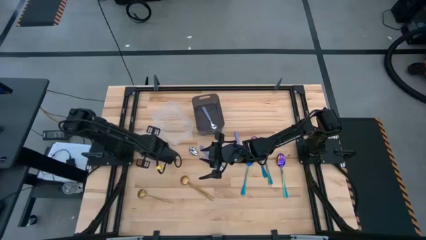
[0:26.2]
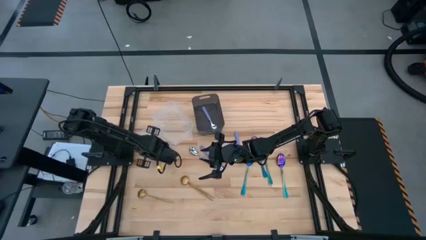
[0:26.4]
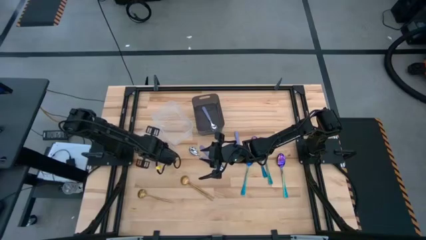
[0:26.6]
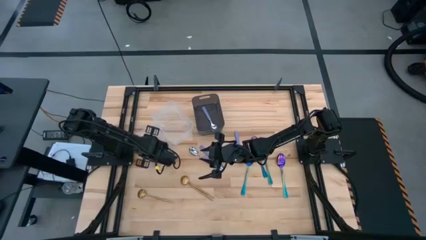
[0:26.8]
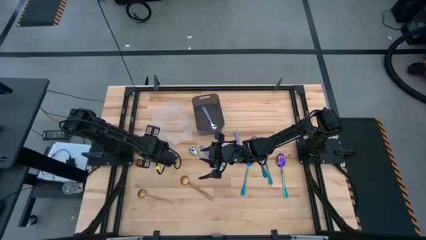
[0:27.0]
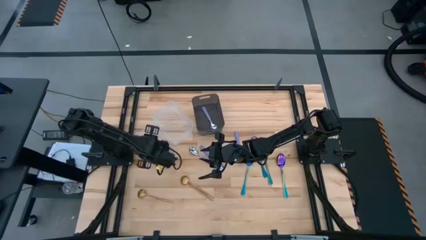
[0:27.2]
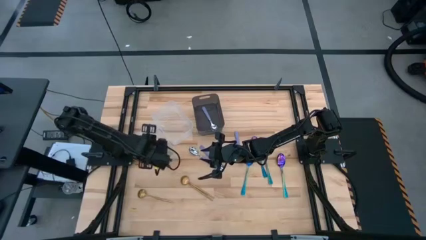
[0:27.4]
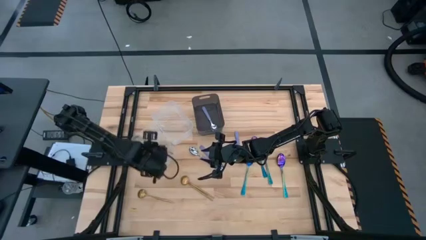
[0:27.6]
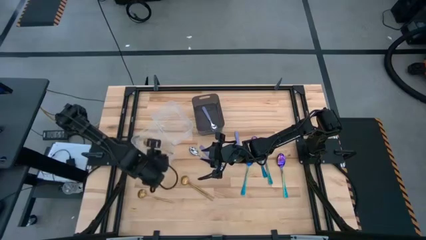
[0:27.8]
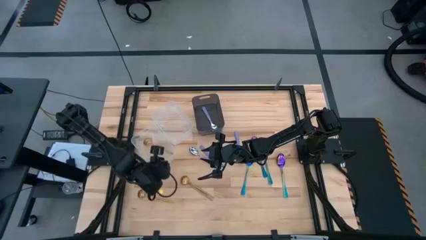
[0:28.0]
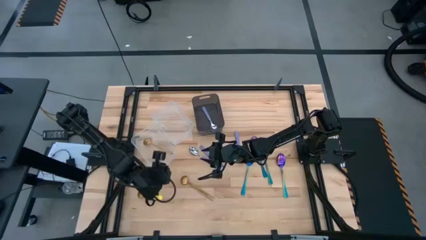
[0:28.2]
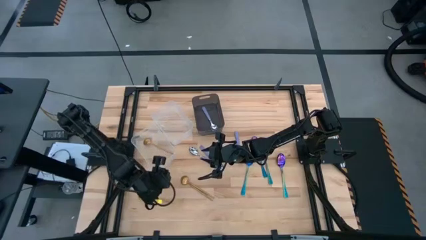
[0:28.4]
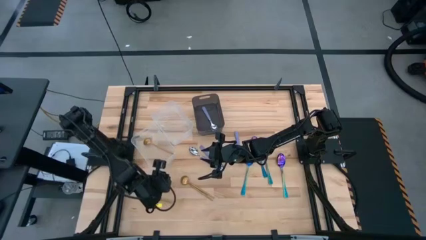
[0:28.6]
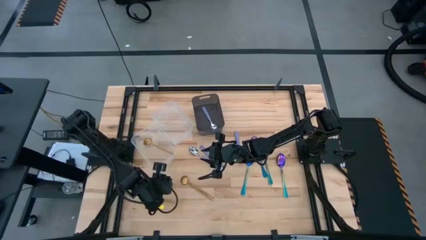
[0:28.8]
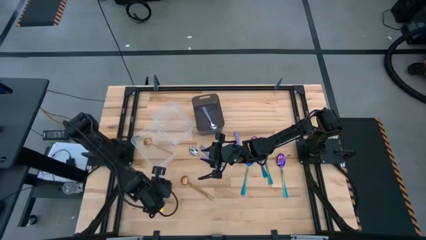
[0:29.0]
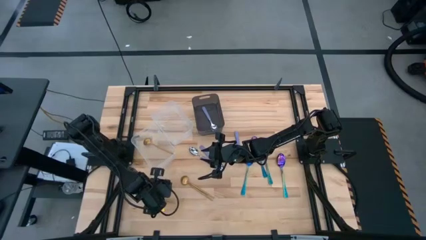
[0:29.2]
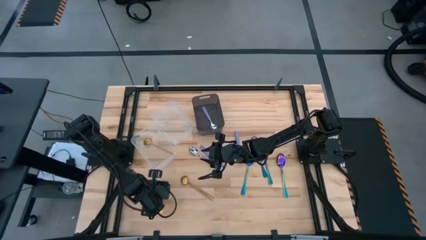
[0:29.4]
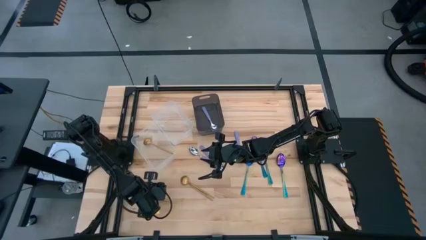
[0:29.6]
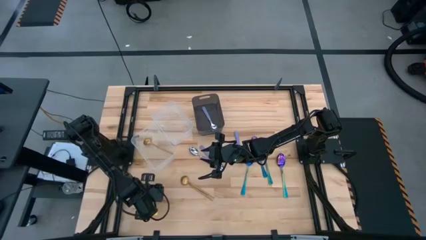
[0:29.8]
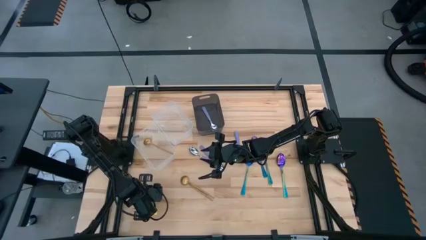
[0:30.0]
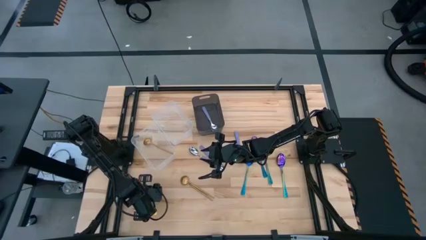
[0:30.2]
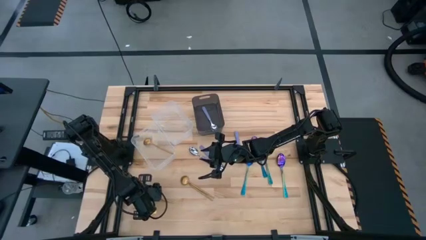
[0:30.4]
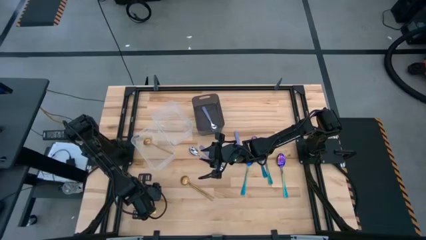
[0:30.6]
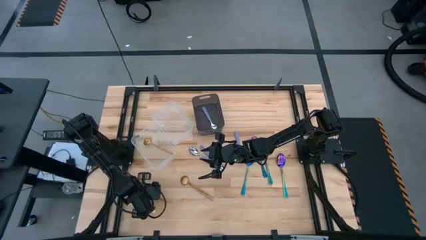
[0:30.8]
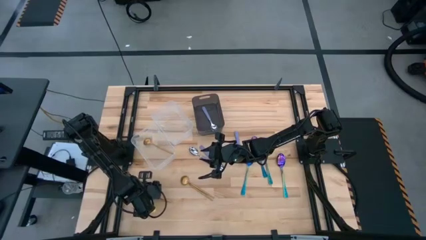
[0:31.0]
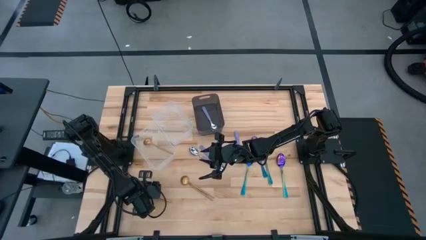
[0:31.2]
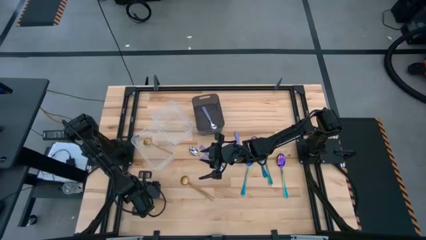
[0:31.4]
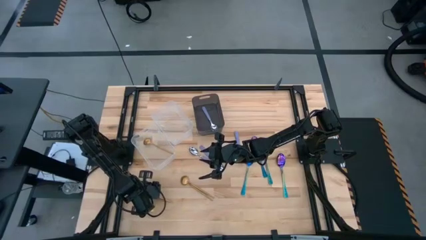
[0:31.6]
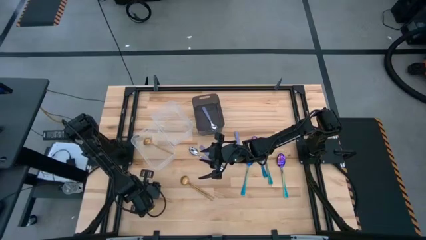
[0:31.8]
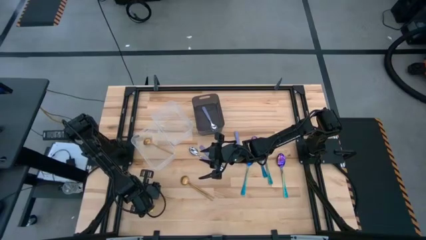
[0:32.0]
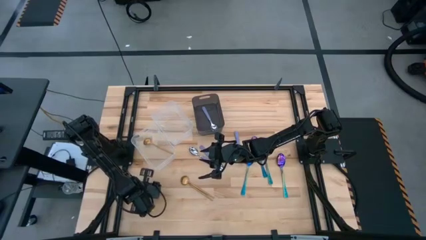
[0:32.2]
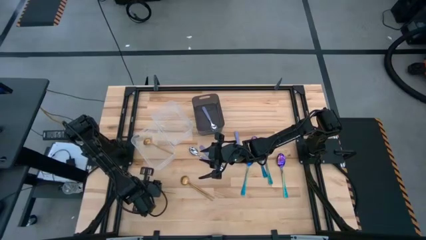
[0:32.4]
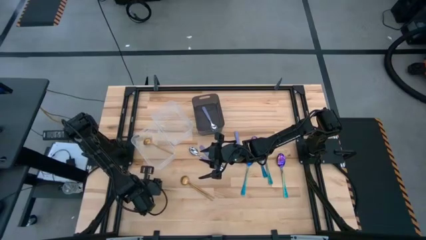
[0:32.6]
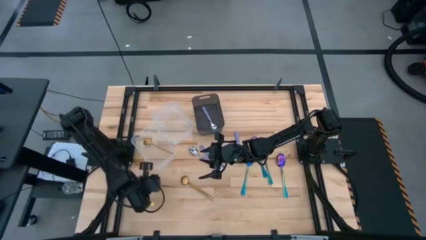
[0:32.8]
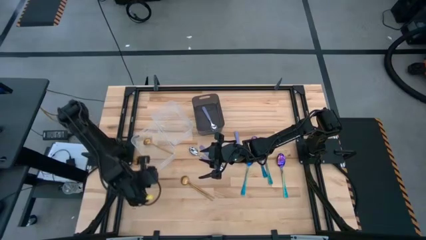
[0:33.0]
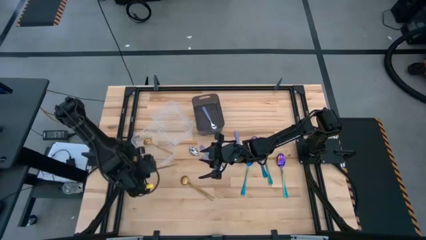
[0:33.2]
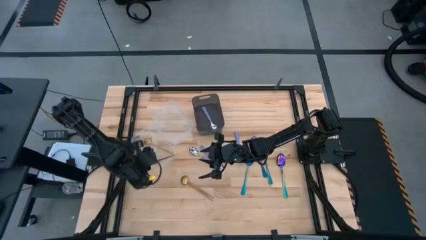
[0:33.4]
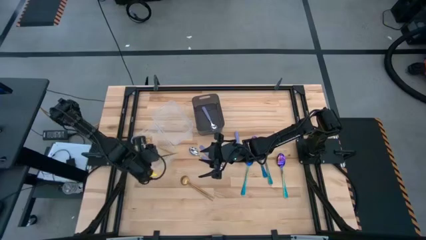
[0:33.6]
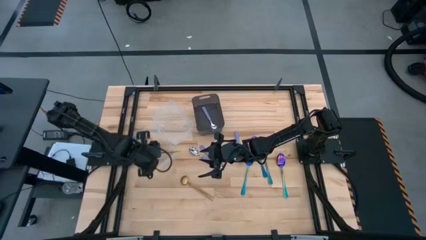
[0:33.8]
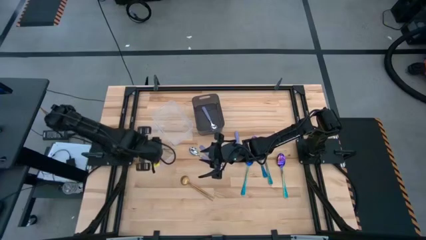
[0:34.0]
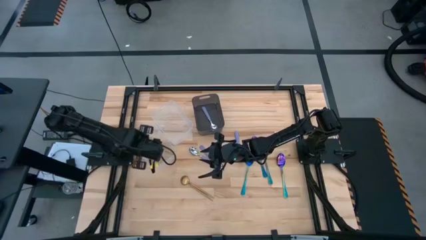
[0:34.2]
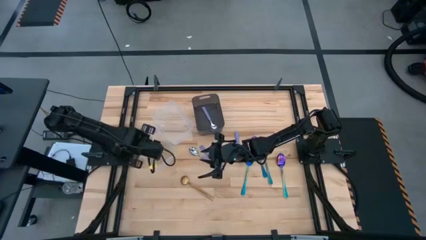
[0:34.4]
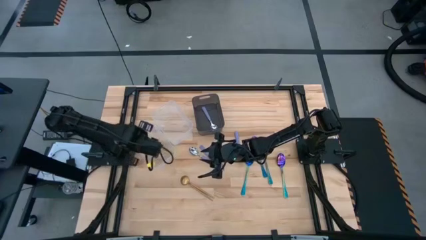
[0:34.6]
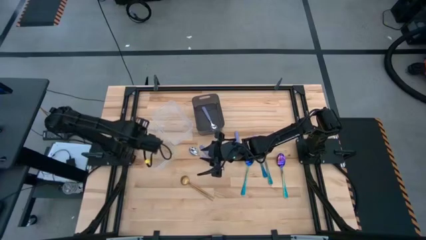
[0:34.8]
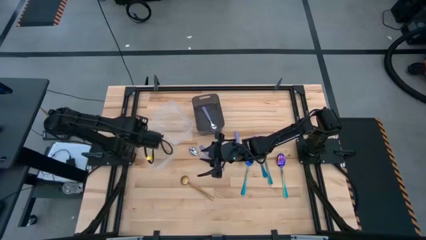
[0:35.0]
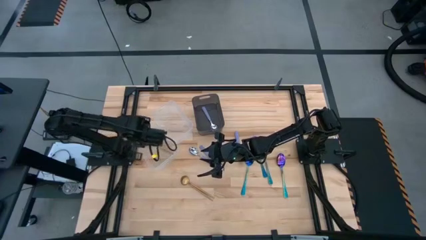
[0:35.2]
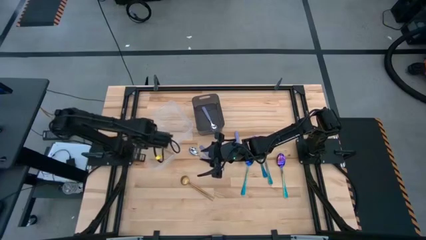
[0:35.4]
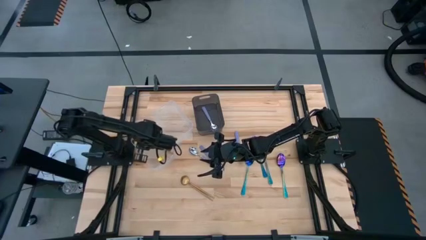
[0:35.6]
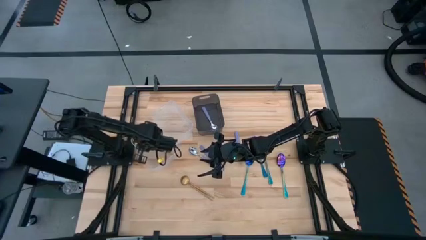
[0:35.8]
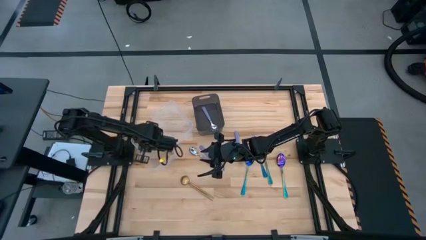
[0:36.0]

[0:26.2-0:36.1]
Task: Sort silverware by color (type)
Put the gold spoon into the bottom transparent bin

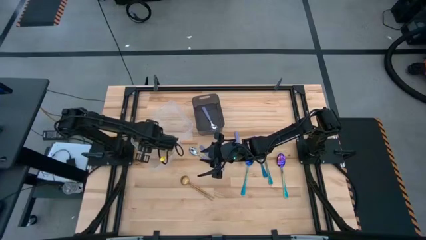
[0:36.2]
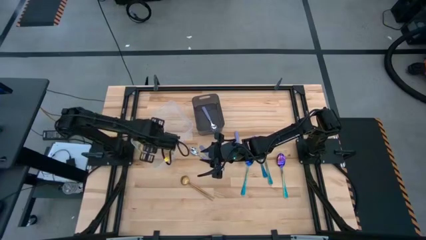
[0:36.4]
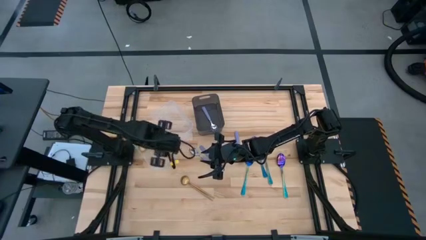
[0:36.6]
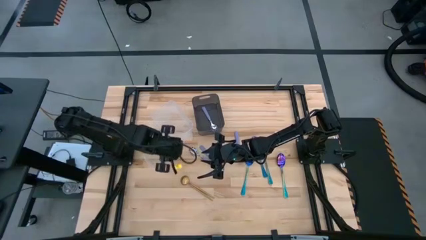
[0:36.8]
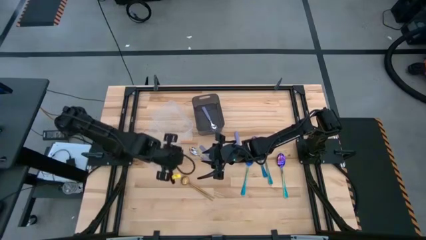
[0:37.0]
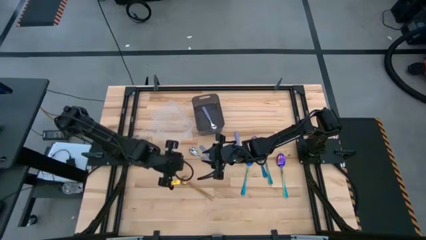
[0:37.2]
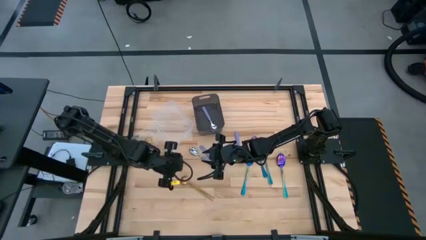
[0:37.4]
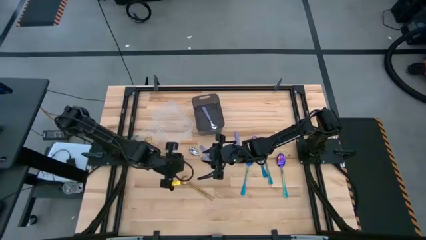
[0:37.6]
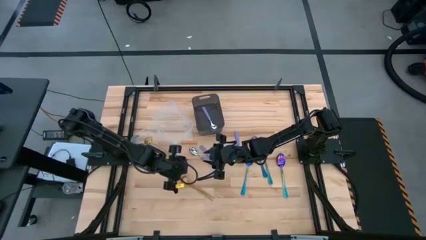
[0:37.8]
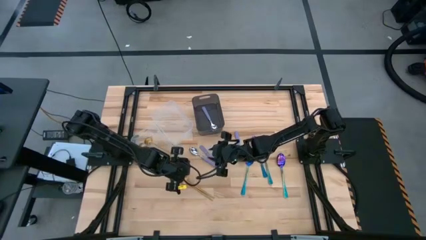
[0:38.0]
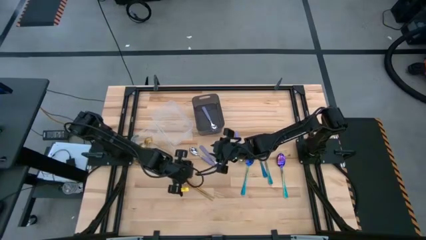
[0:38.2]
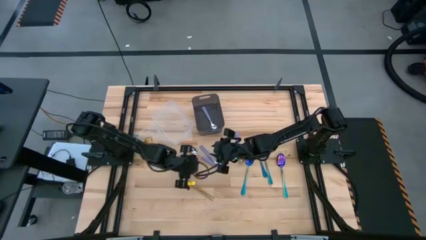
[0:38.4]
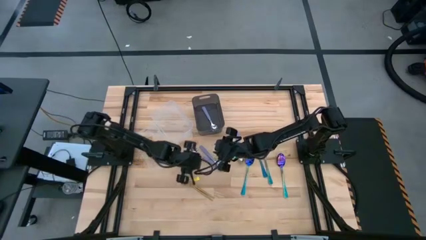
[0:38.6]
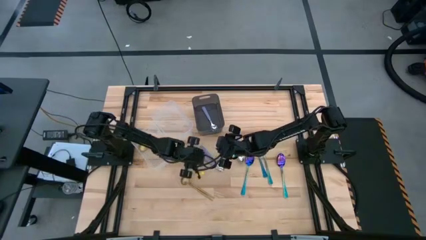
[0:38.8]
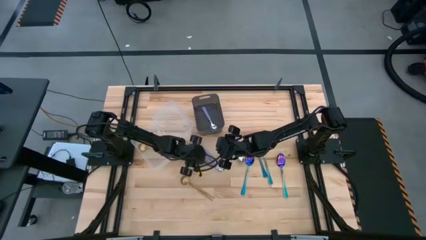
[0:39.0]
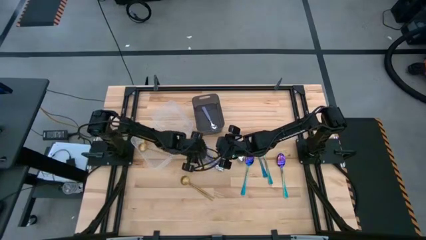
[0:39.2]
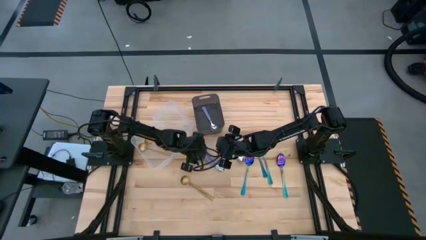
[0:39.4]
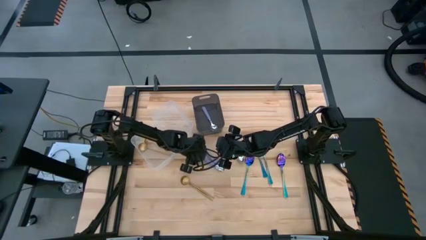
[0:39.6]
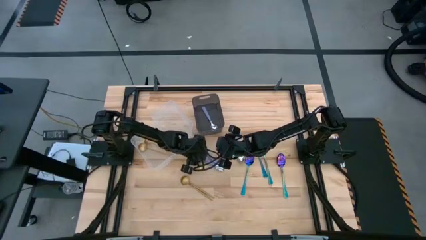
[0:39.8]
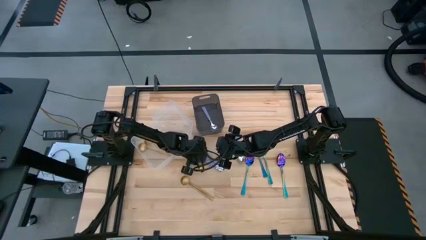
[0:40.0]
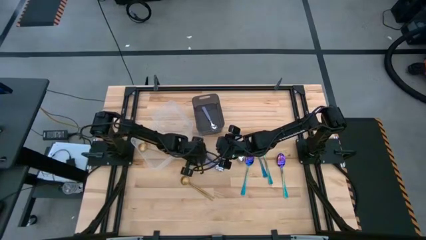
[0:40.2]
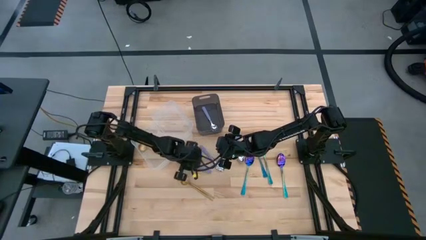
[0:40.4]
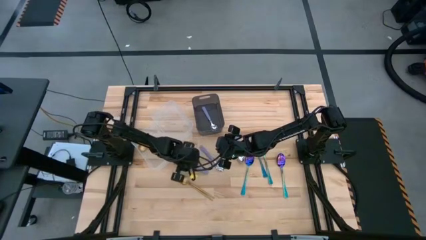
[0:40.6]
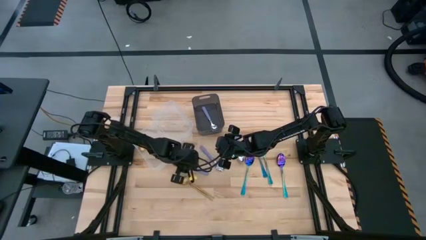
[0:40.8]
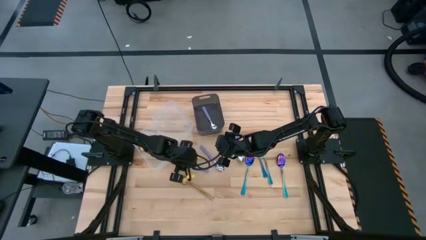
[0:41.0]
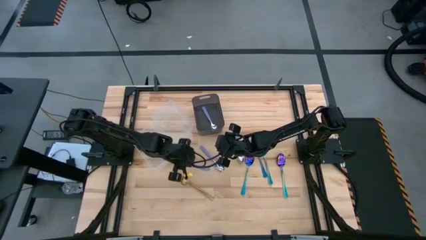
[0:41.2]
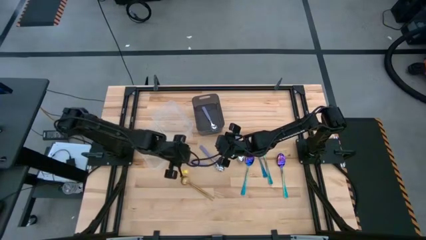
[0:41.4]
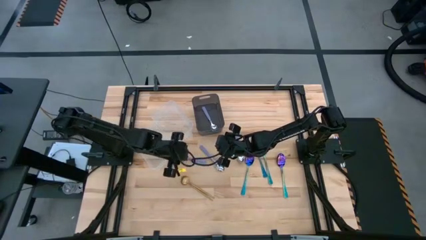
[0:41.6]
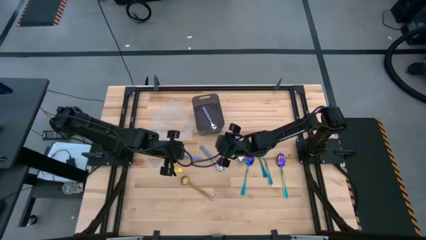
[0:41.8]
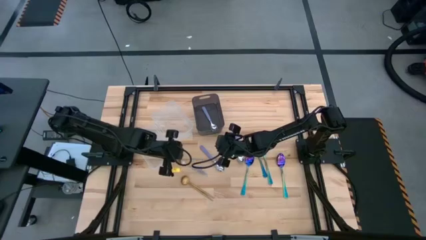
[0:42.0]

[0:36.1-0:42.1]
Put the purple spoon into the black transparent bin
